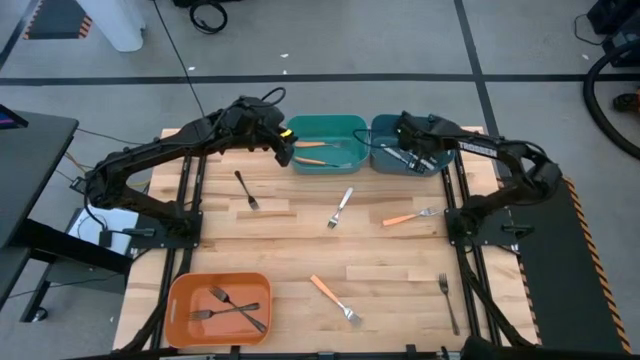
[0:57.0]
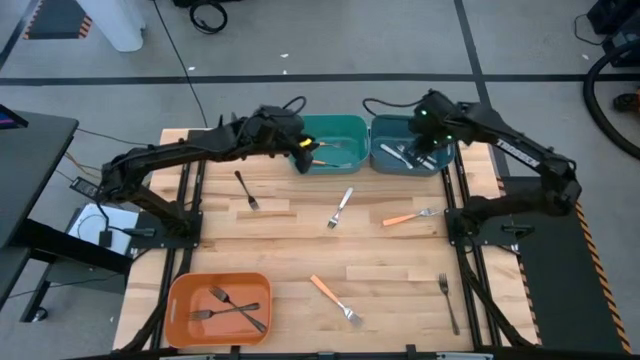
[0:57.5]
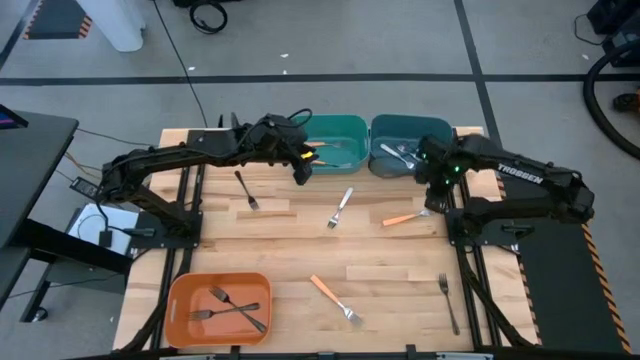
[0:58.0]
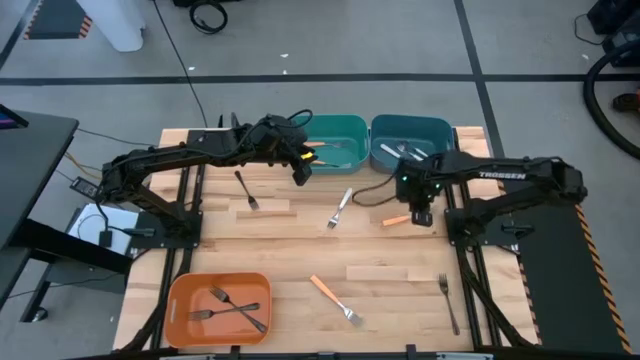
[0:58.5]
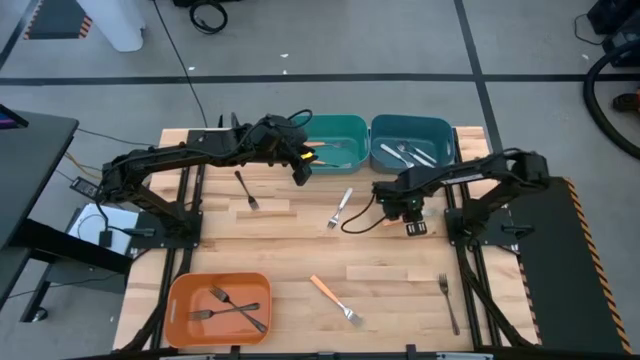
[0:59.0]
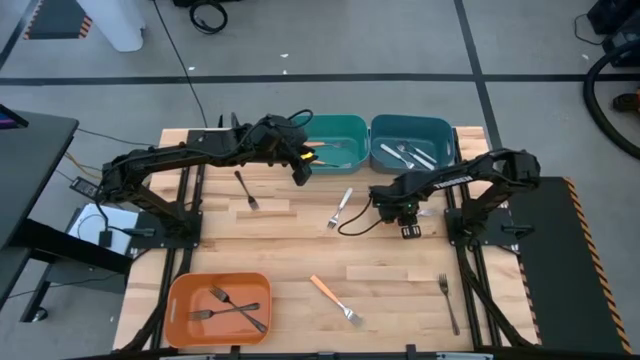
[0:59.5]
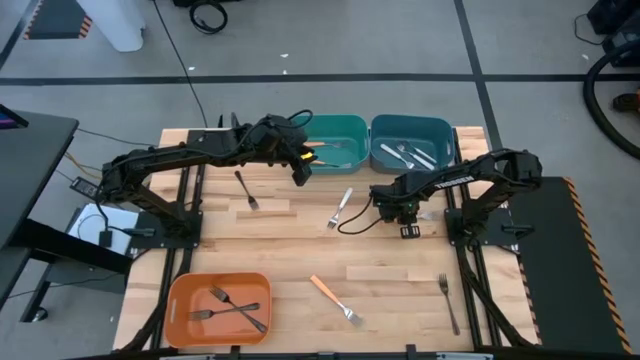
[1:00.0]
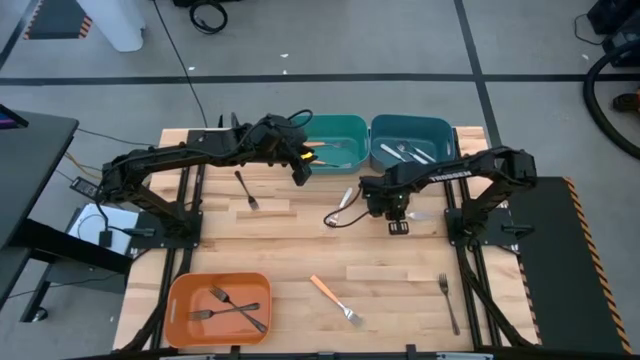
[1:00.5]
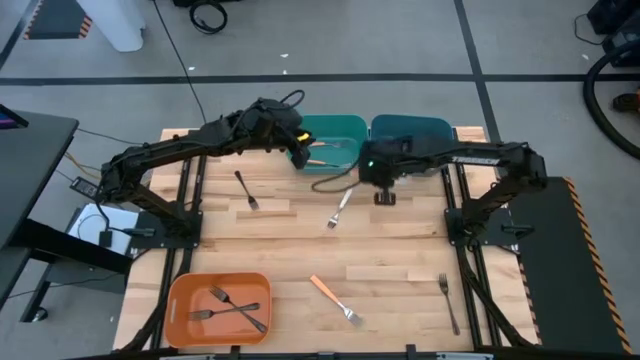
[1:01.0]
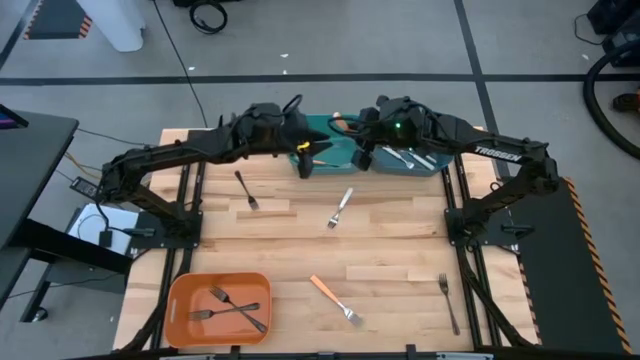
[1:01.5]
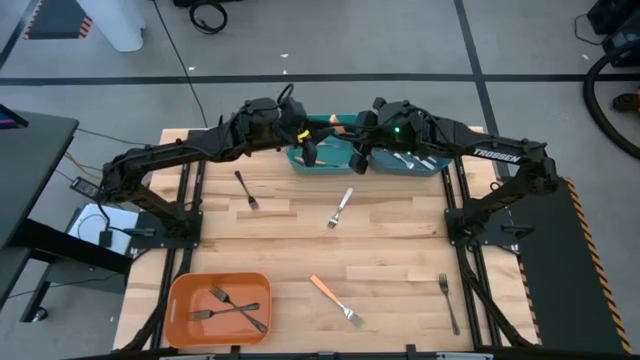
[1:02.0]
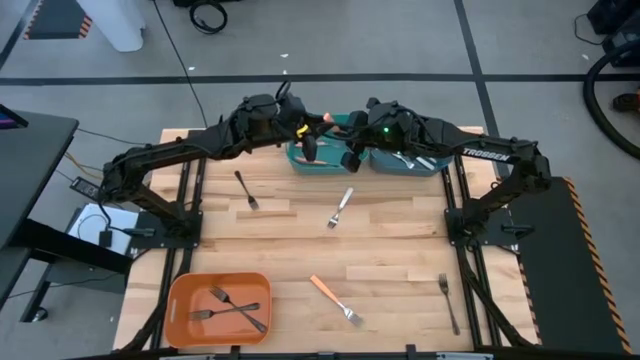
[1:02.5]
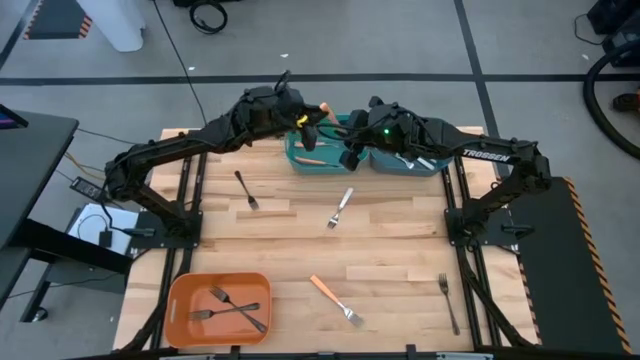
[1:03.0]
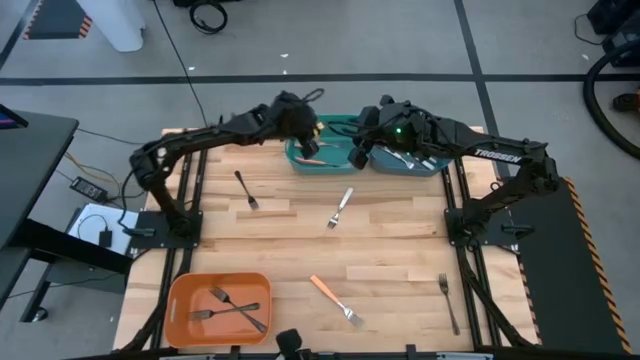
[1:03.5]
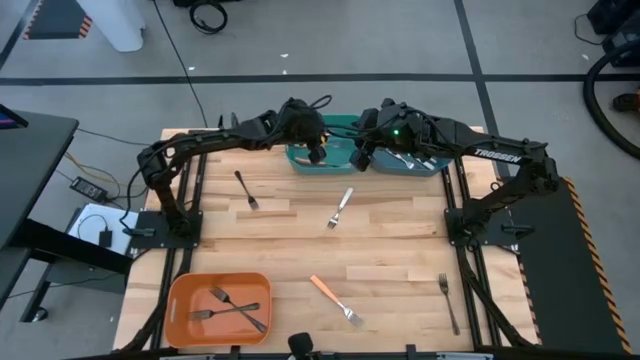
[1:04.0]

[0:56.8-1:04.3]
Task: Sort silverware by color (type)
Put the orange fork into the green bin

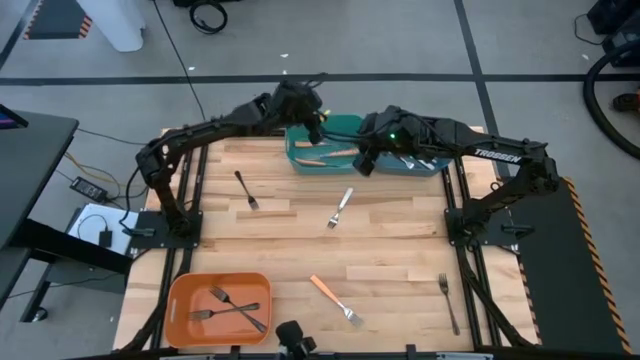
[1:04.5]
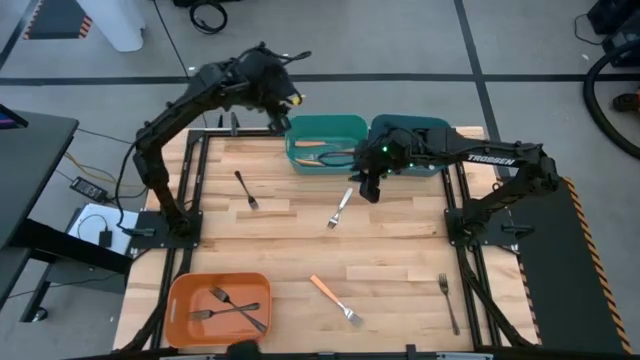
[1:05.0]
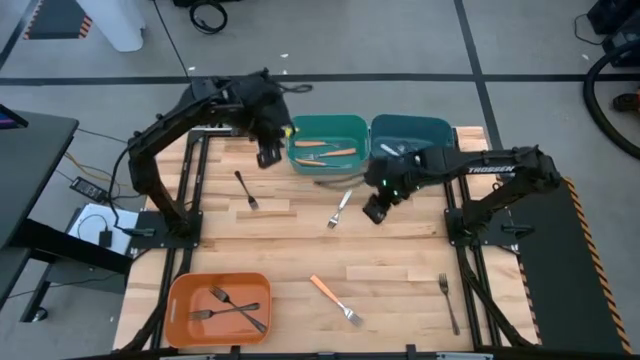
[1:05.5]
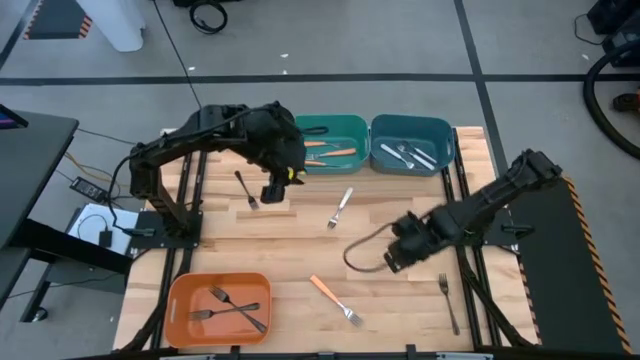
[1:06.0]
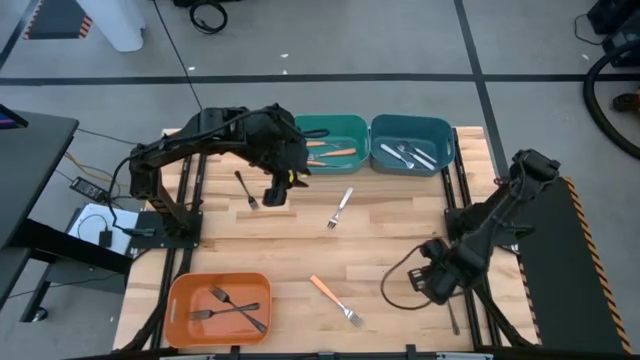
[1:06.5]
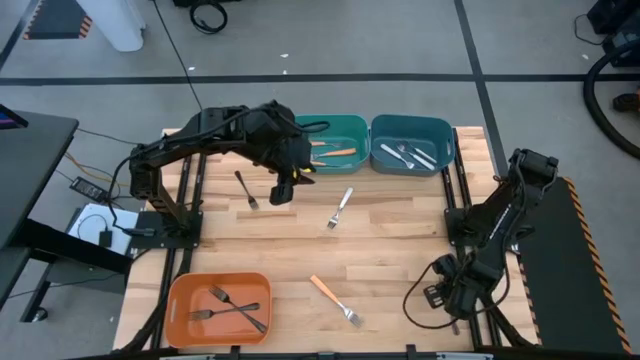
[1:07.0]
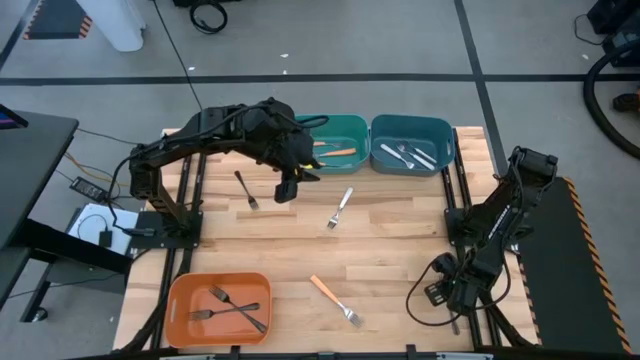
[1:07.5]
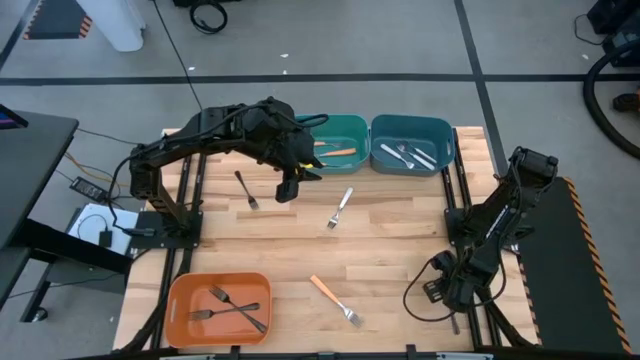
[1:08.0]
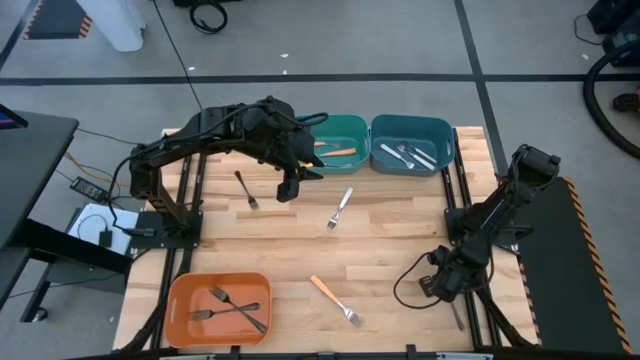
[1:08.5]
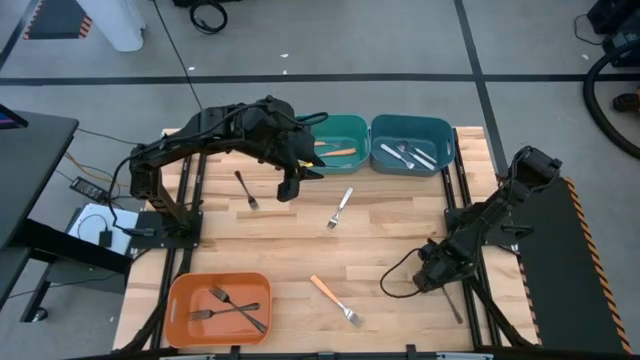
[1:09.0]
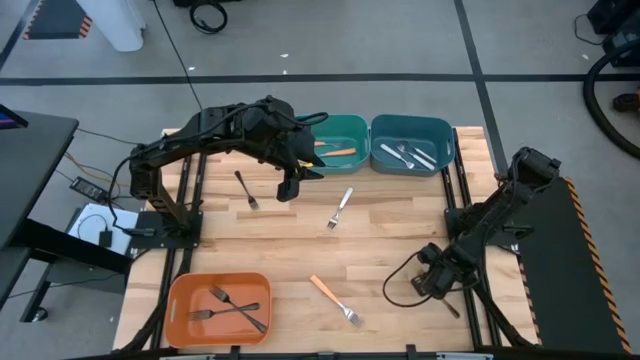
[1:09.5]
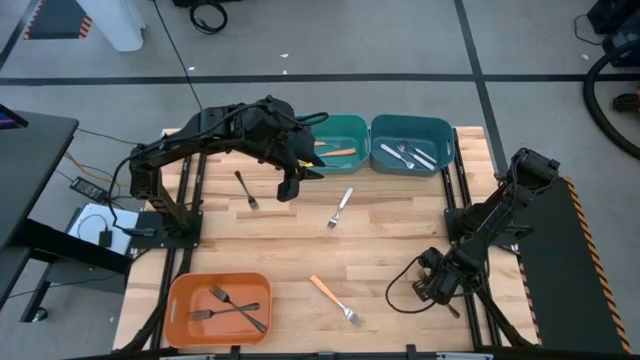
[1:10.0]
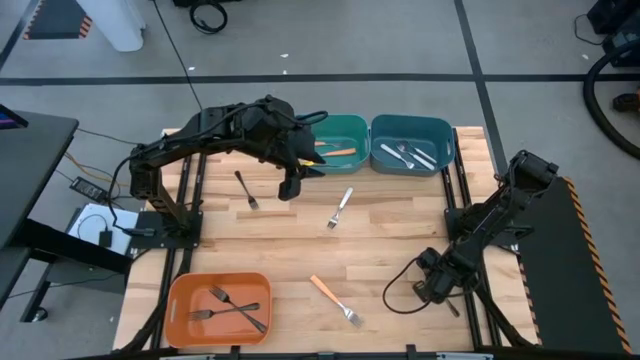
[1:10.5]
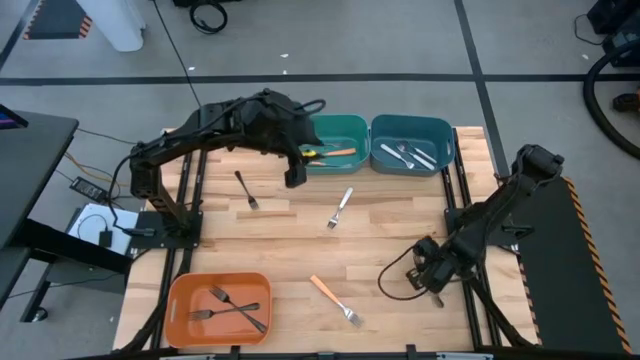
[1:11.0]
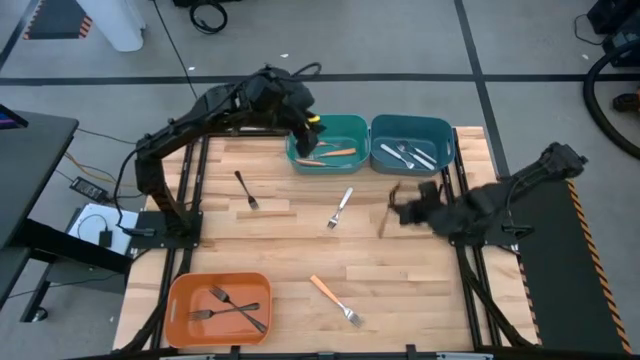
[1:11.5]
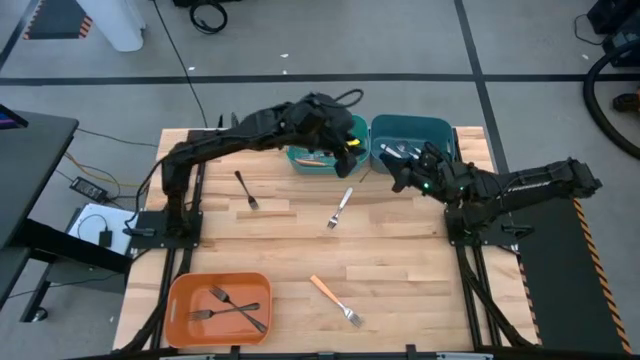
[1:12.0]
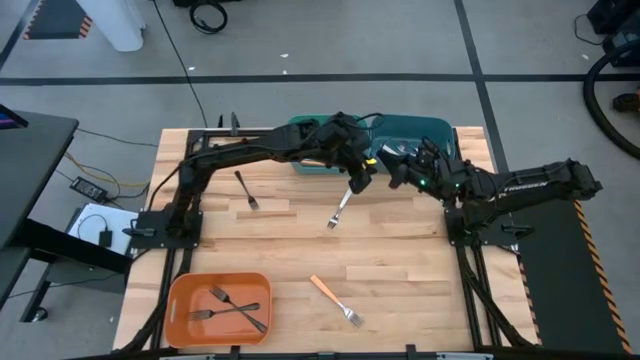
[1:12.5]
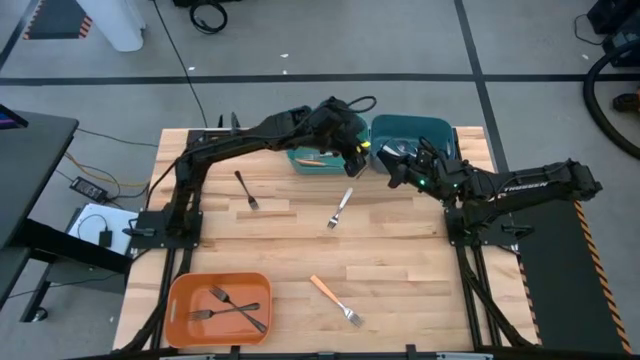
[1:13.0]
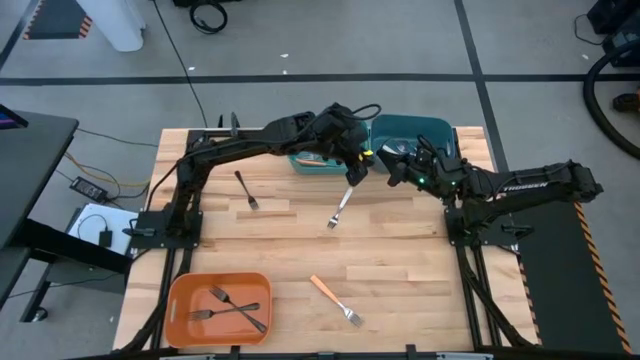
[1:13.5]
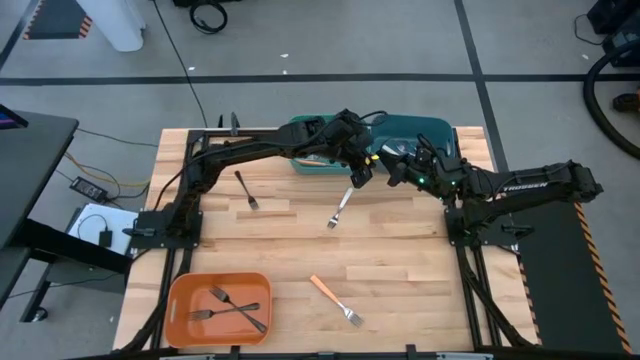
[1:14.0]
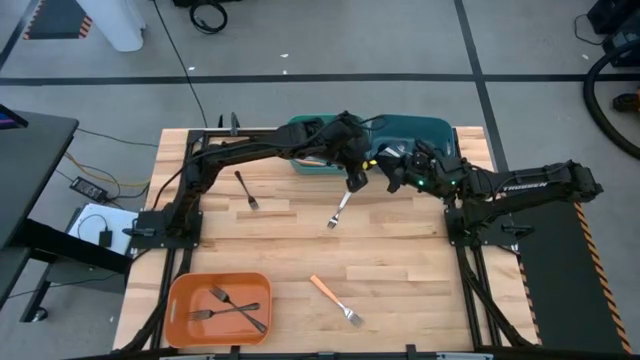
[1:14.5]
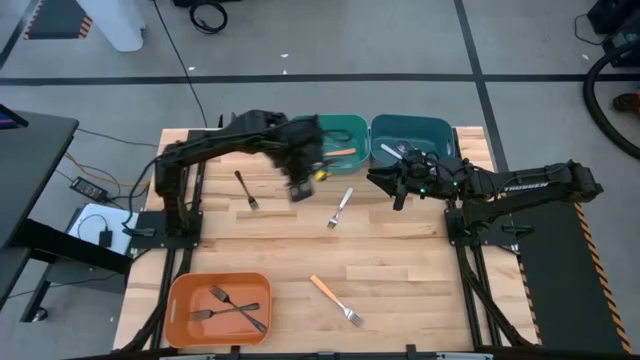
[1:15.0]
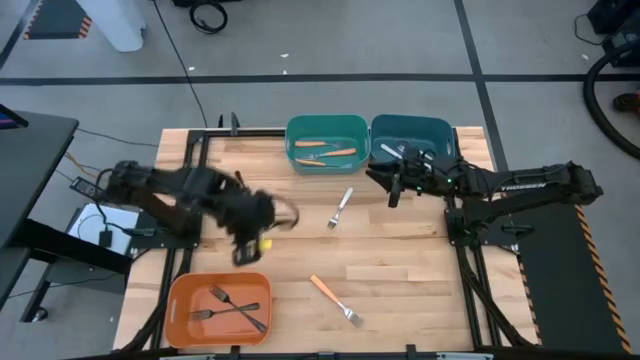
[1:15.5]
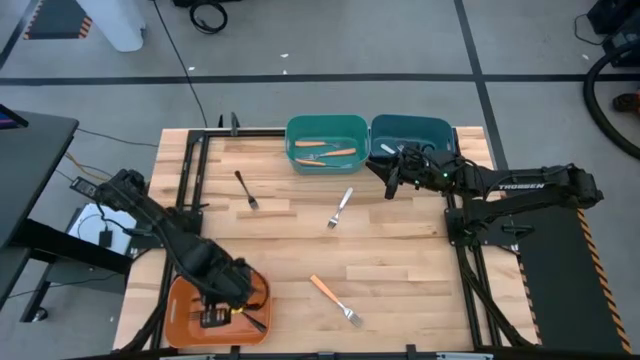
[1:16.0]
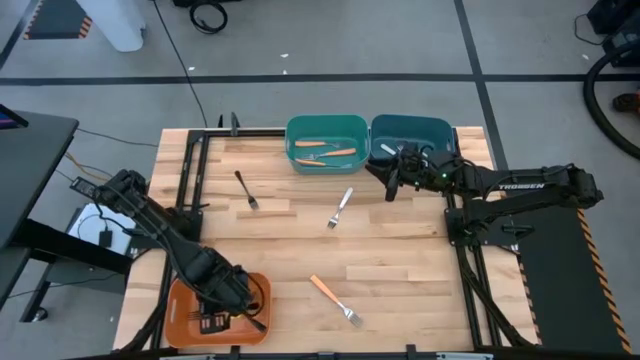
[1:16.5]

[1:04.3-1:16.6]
Put the black fork into the orange bin

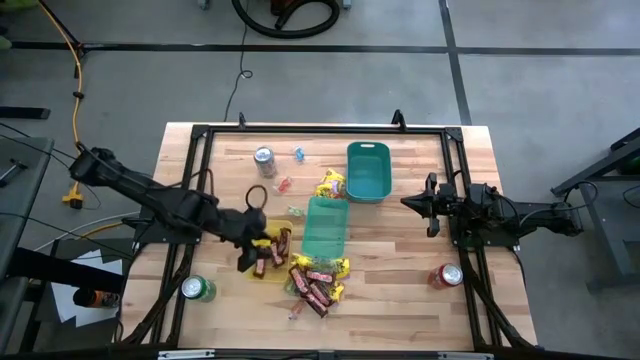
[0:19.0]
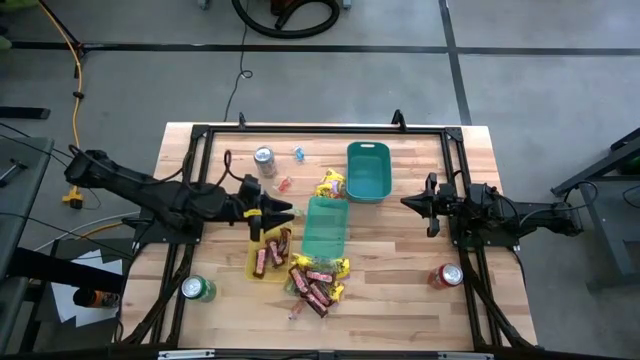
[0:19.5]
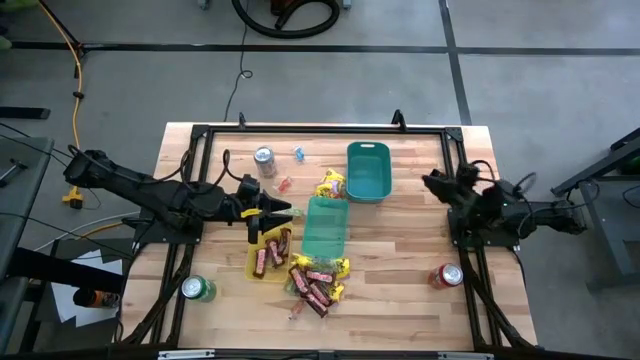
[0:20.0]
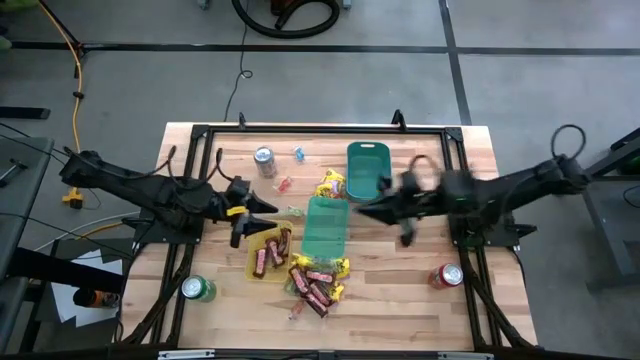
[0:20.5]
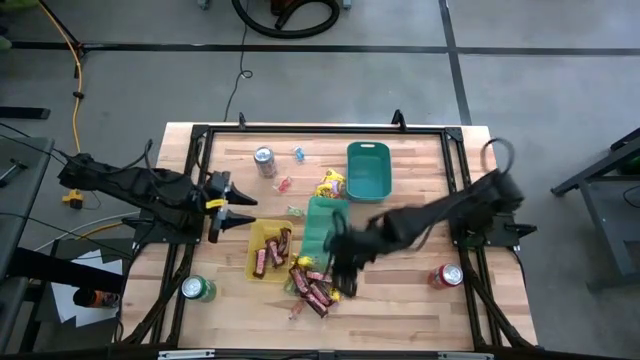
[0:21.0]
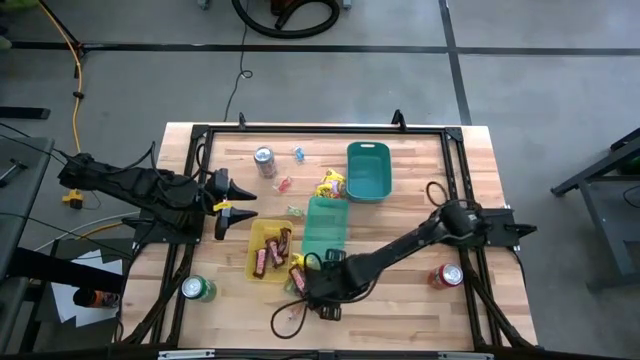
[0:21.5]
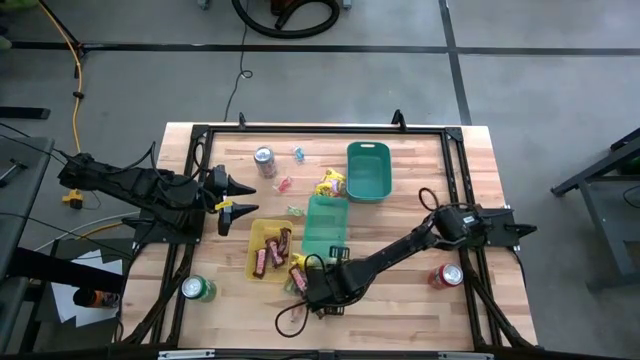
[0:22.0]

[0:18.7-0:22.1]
Task: Sort candy
Put the brown chocolate bar into the yellow bin
